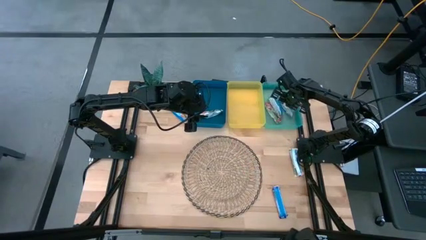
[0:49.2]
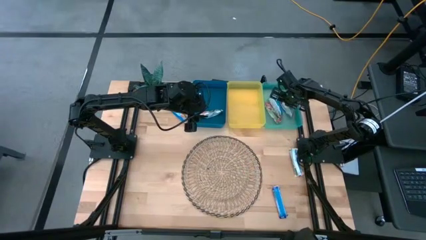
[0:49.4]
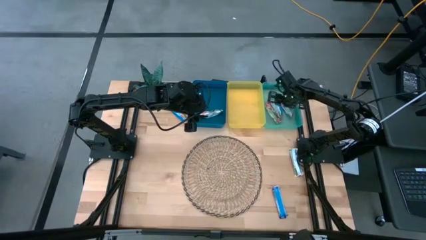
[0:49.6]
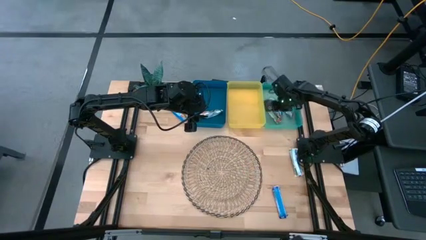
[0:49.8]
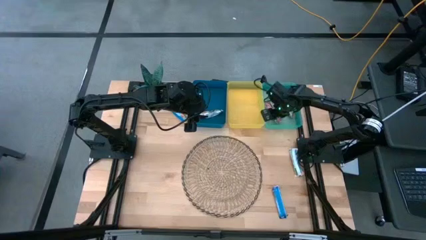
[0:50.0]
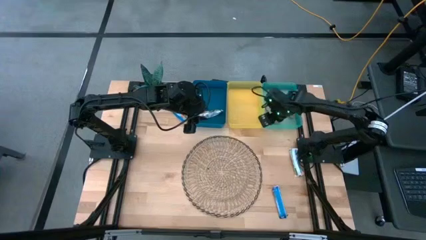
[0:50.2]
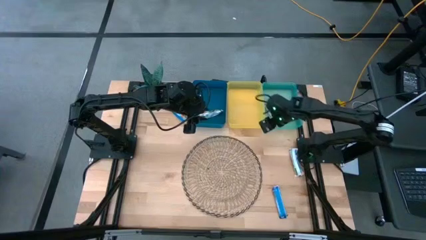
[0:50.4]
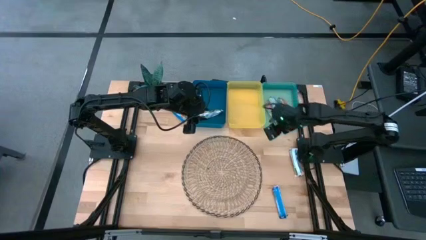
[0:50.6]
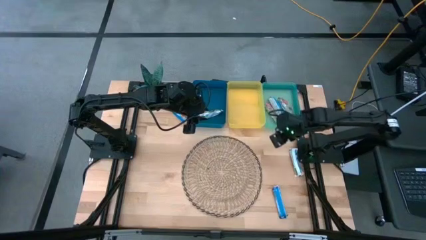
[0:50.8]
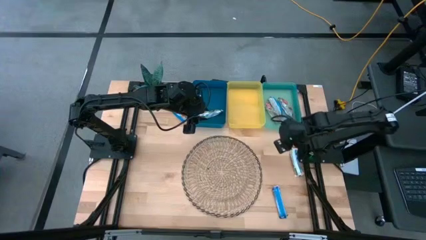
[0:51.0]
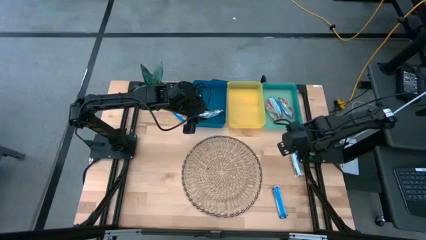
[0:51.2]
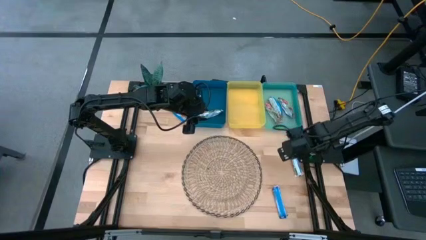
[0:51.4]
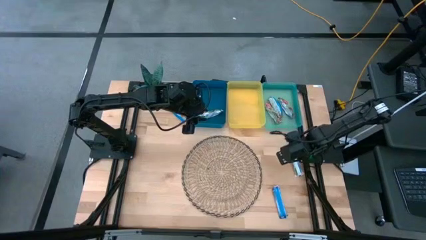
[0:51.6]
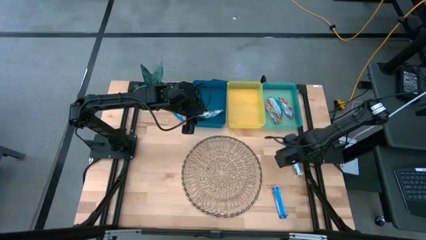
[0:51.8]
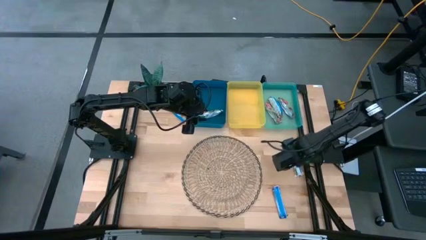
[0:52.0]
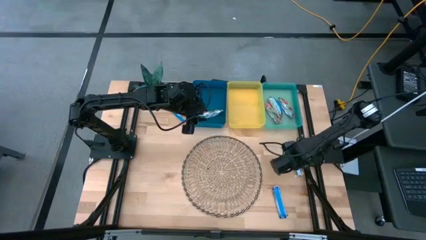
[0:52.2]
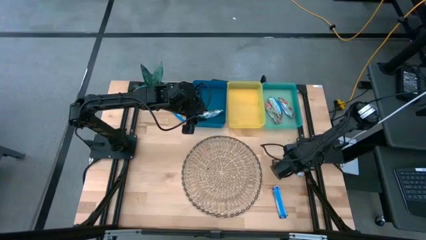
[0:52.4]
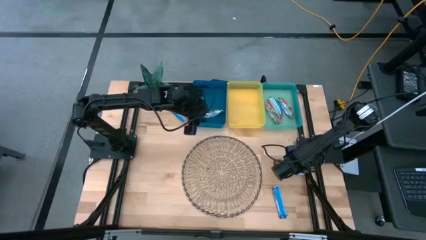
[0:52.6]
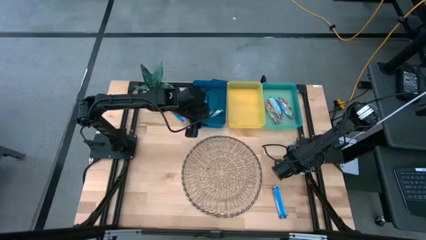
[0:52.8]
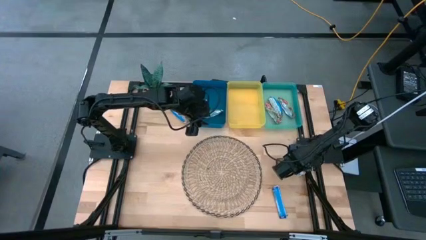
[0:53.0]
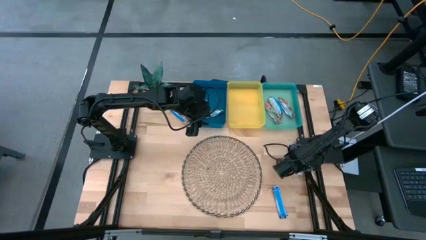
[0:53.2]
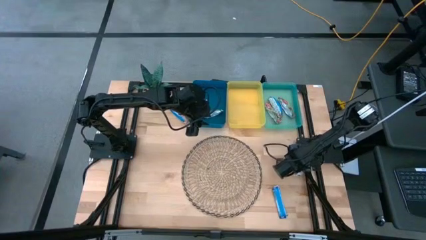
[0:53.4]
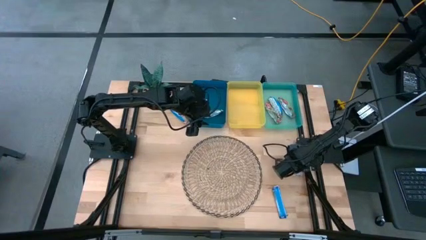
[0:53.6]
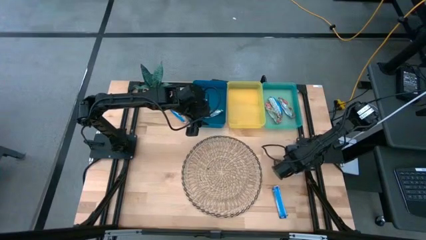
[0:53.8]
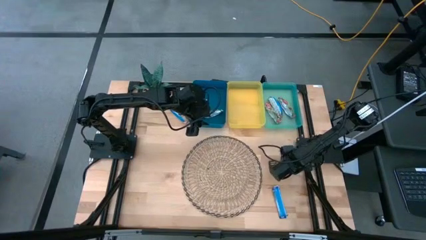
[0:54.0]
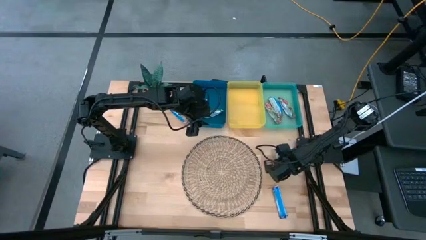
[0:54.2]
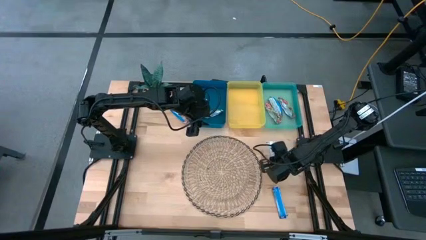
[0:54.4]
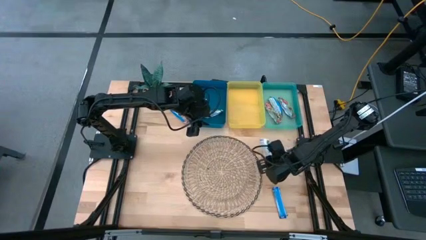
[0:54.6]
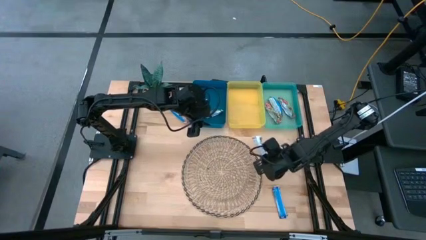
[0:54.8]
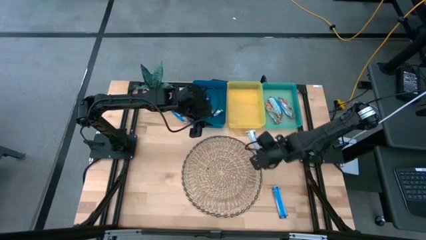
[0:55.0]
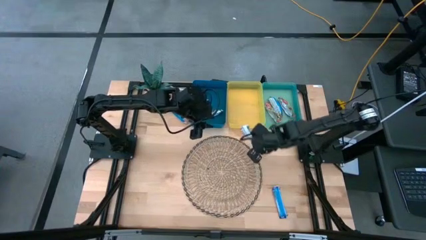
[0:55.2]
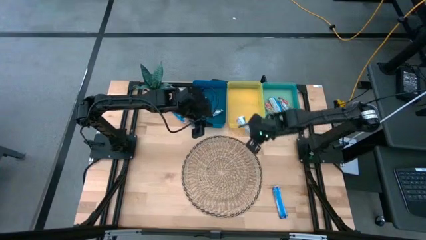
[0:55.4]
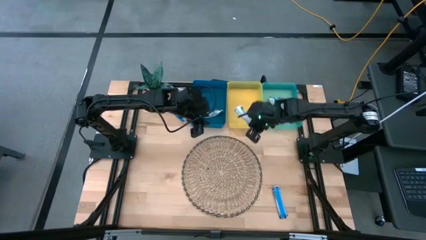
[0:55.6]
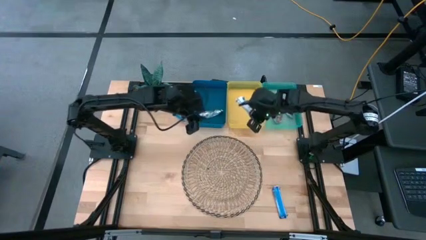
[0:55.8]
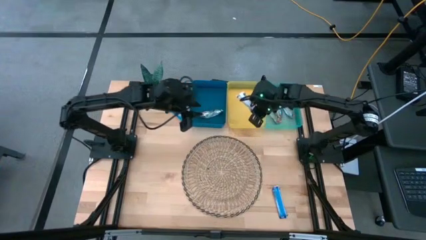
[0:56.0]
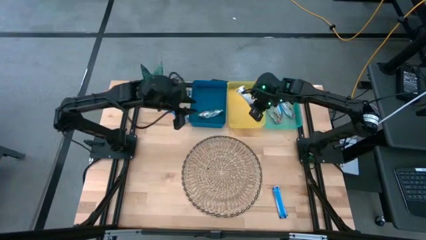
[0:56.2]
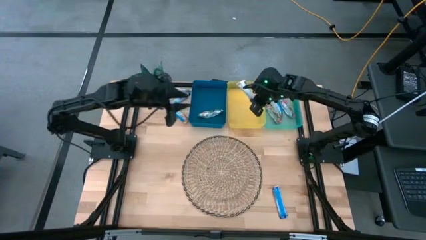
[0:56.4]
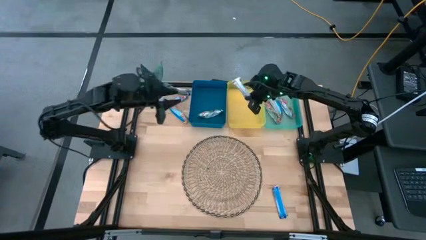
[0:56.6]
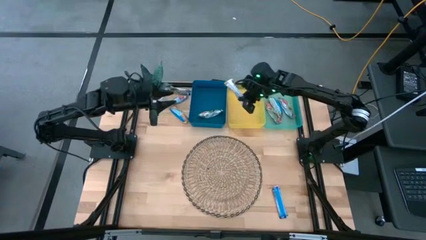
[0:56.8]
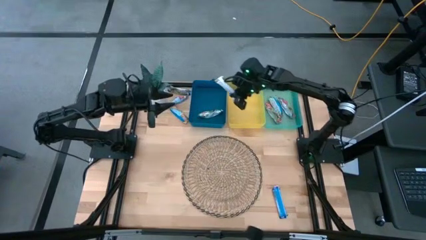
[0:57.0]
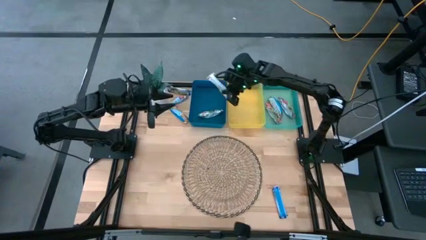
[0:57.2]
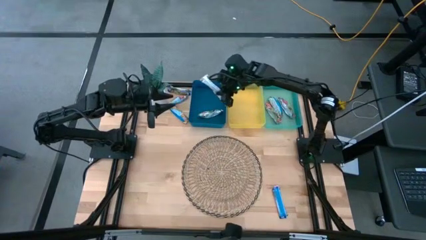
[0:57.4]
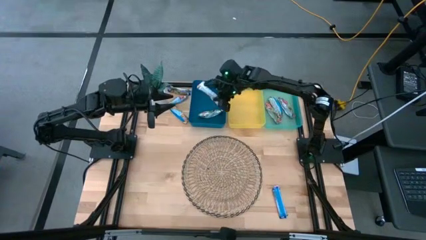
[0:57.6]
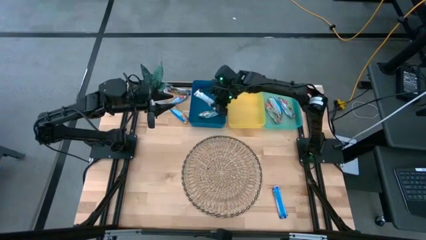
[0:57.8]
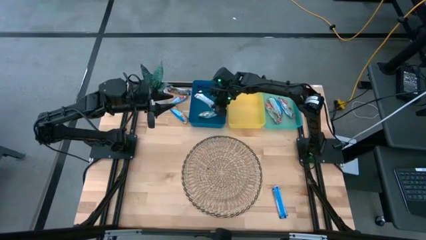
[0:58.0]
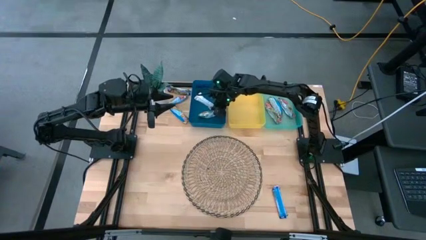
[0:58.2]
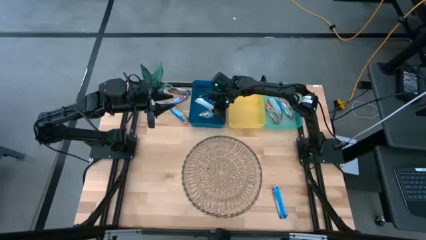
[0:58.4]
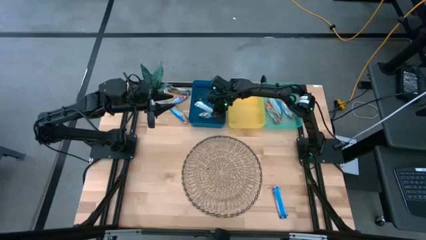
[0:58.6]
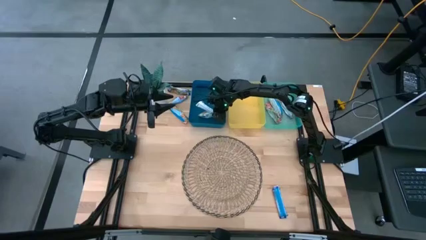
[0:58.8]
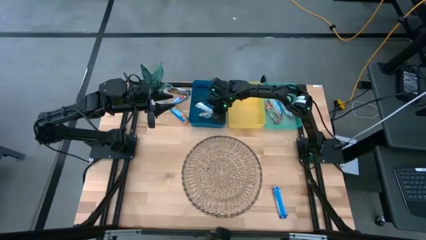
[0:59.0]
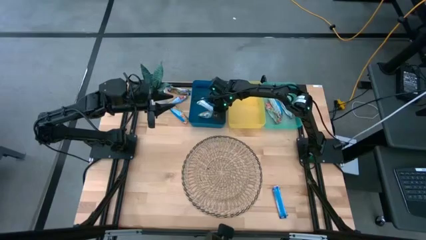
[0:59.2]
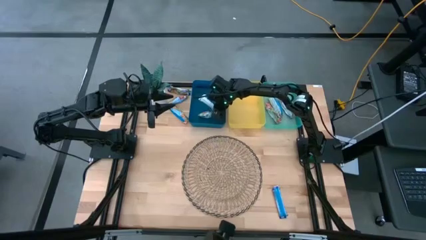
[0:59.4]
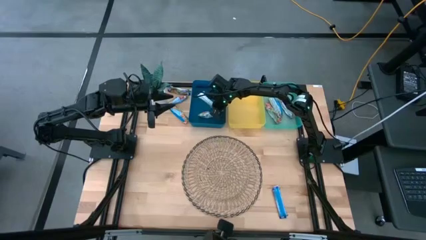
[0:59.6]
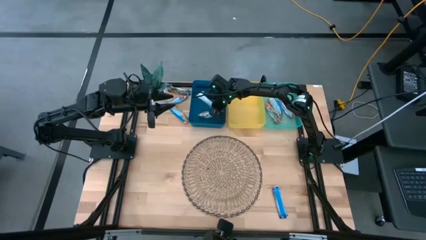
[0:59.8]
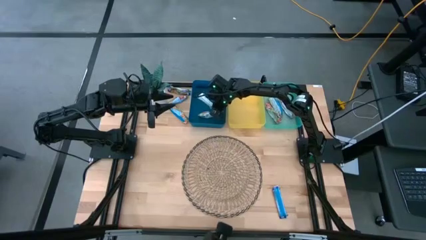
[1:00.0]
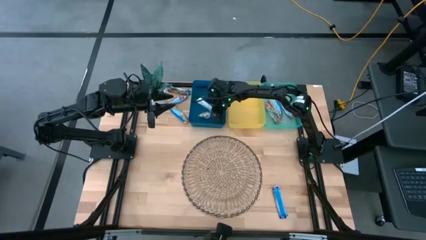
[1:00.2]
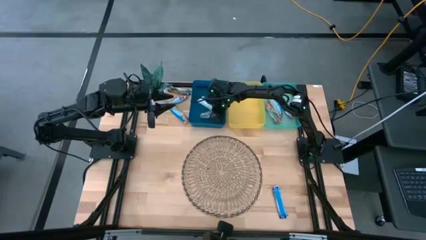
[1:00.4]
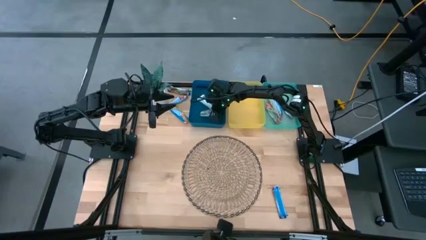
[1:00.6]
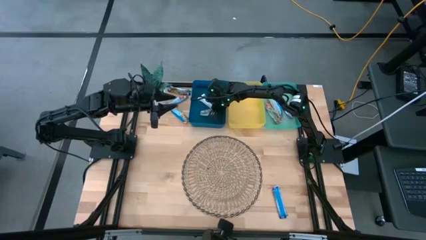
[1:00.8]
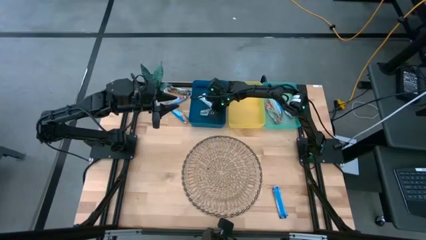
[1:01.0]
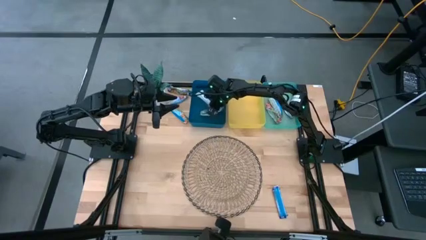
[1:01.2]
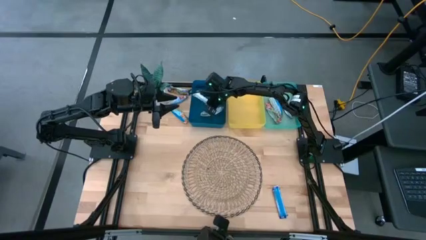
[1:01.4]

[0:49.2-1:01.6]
Task: Pick and place Granola Bars by type
Put the yellow granola bar into the blue bin
